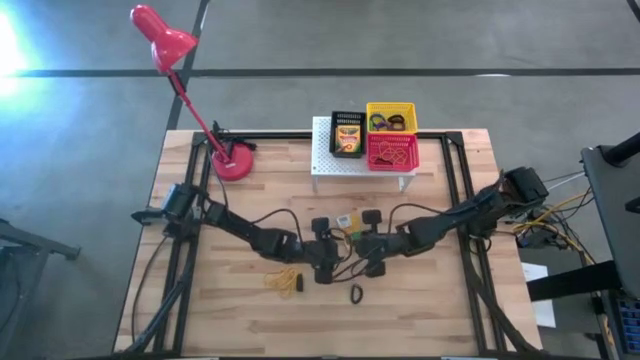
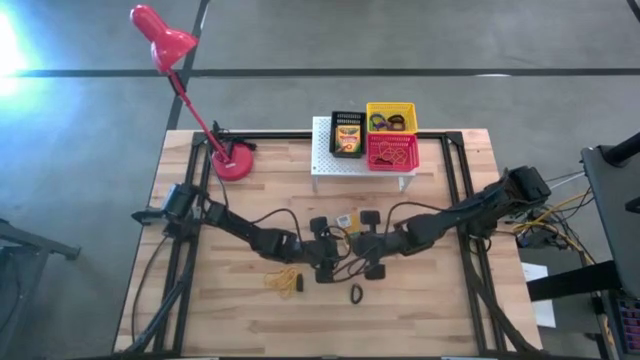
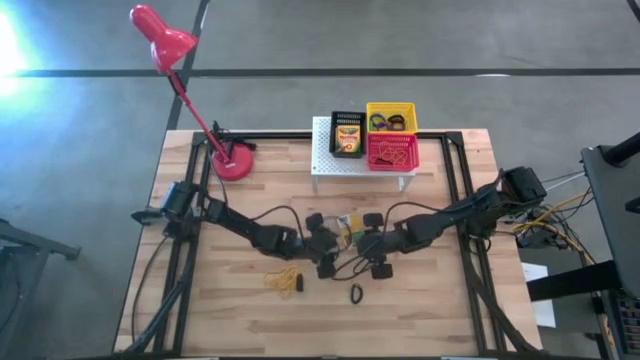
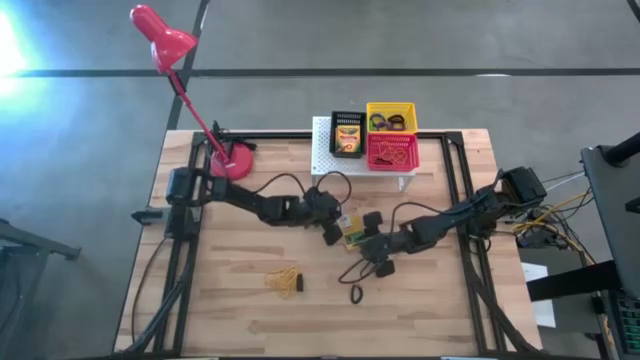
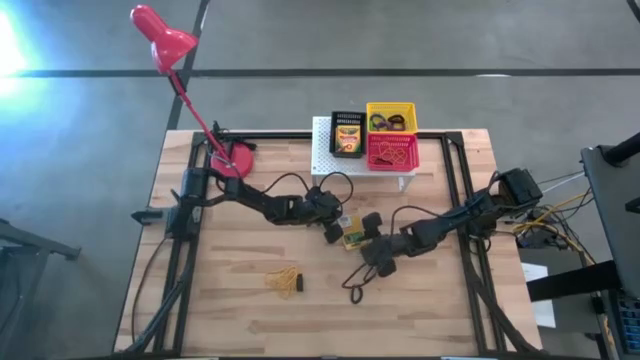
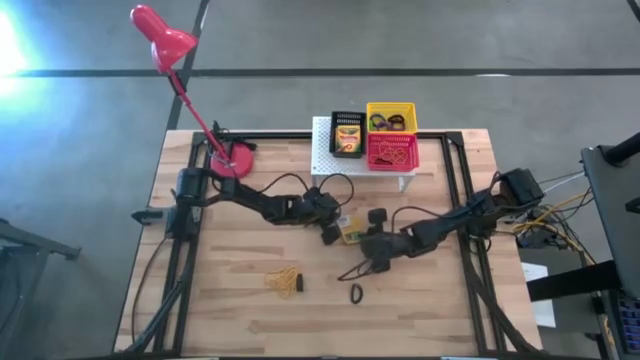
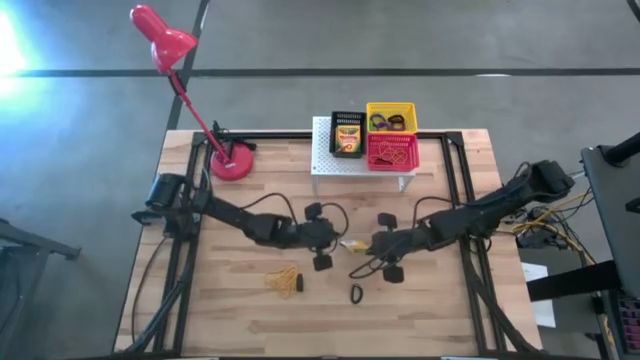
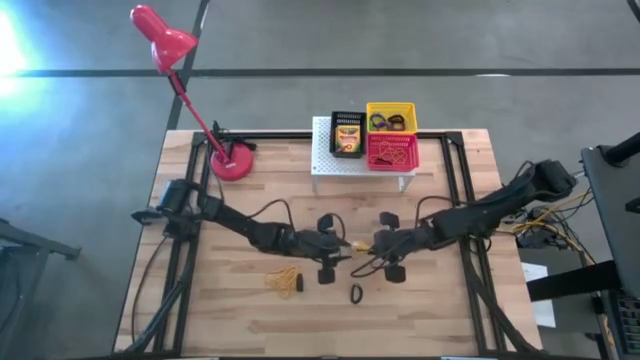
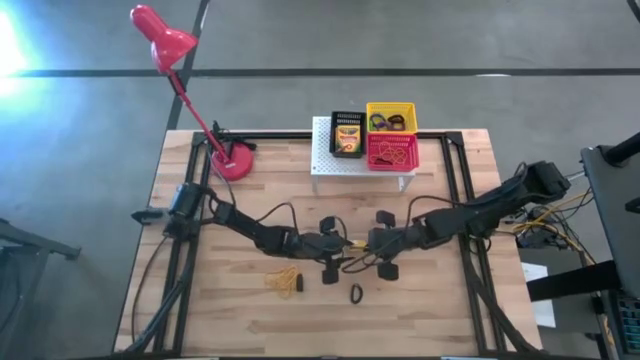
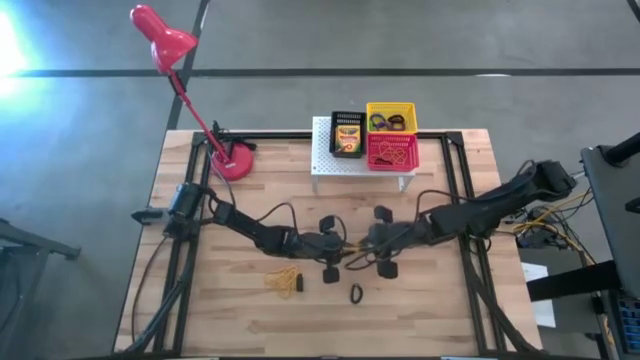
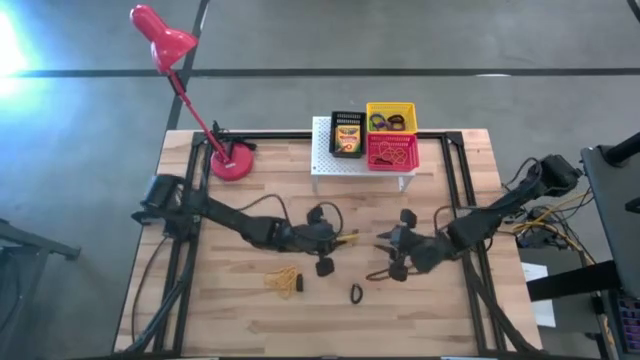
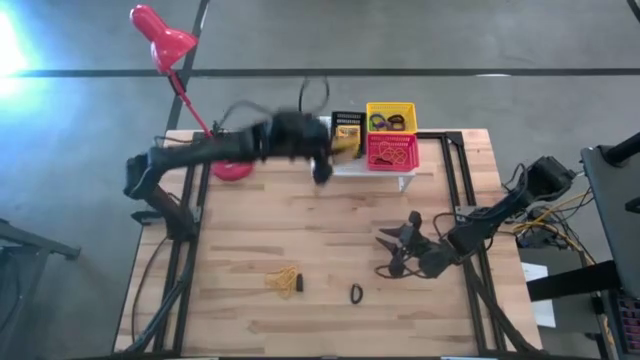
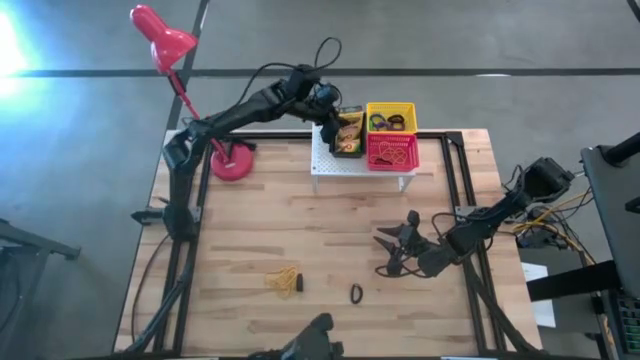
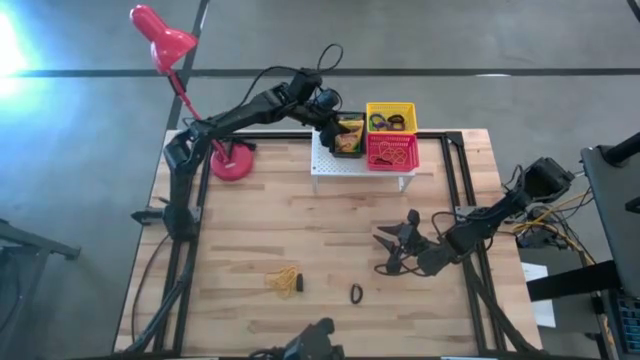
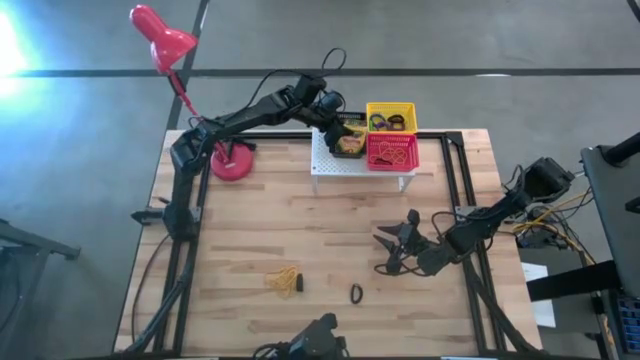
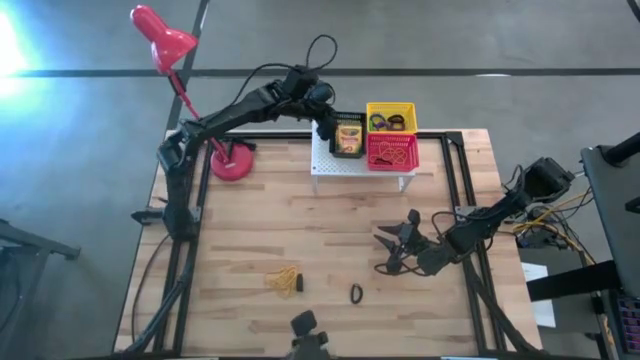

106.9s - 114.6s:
Task: Pick & Place Office Desk Supplies
Put the crayon box into the black basket on the shelf

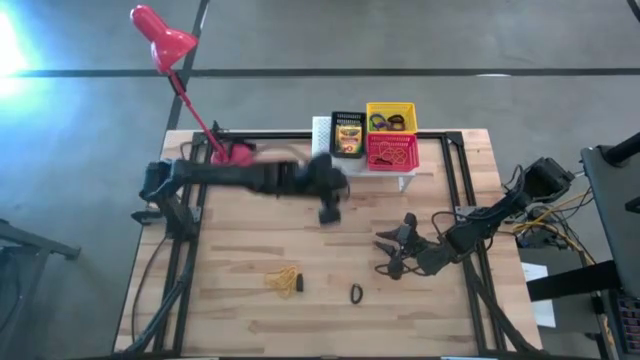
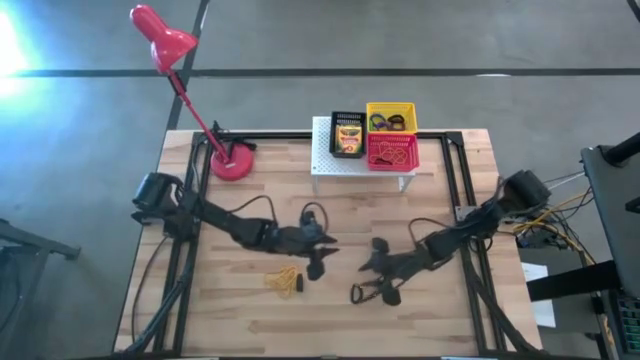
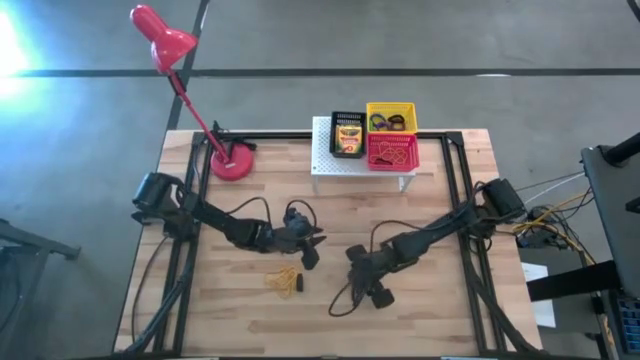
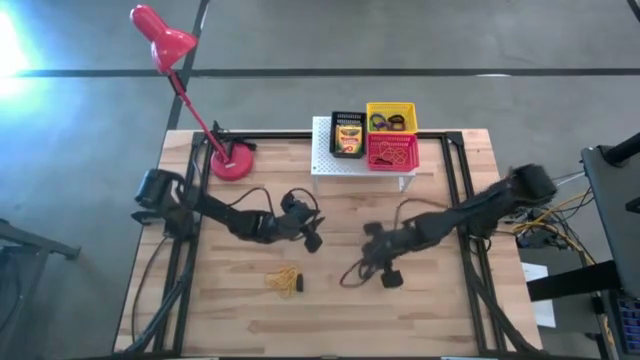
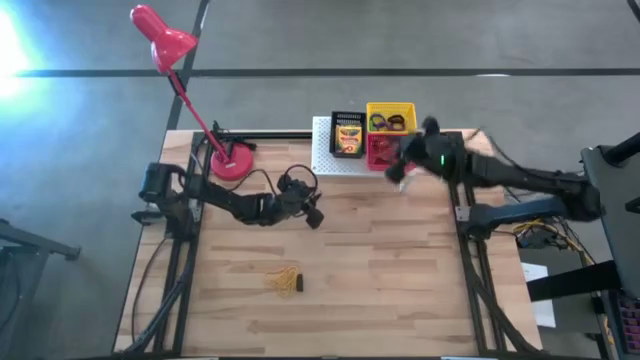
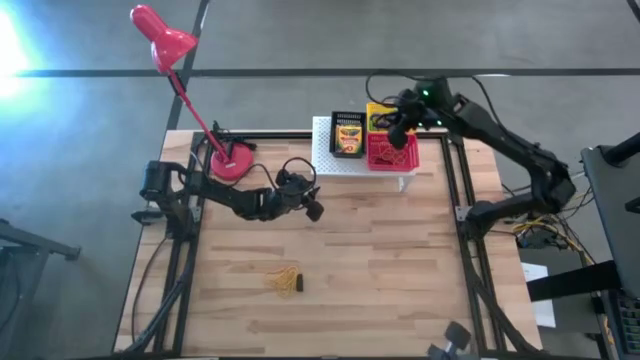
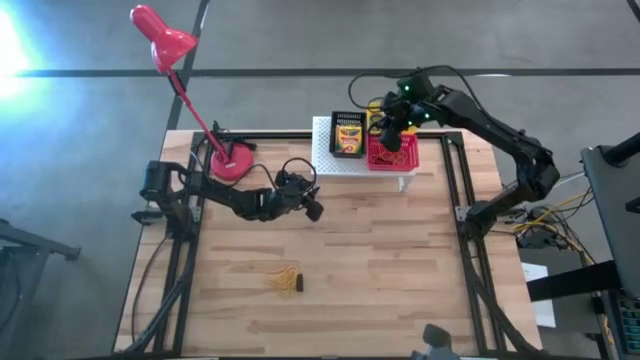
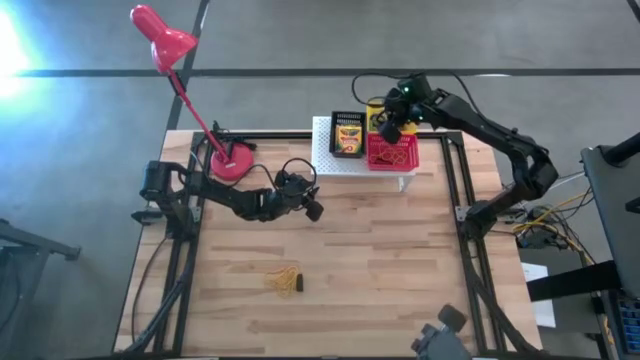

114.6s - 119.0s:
Put the black spring keychain into the yellow basket on the shelf

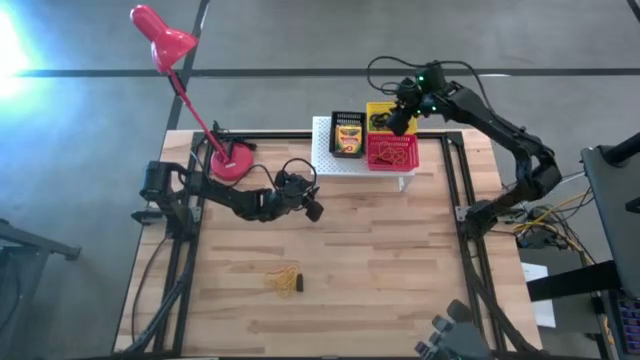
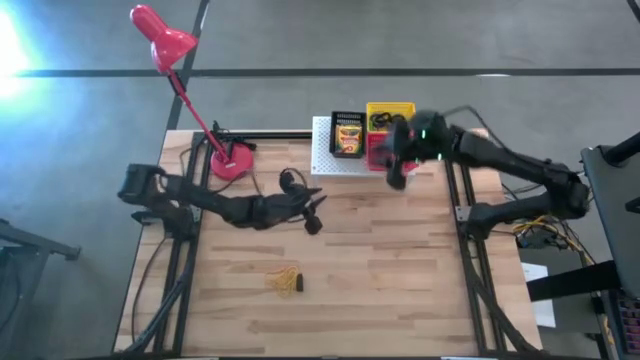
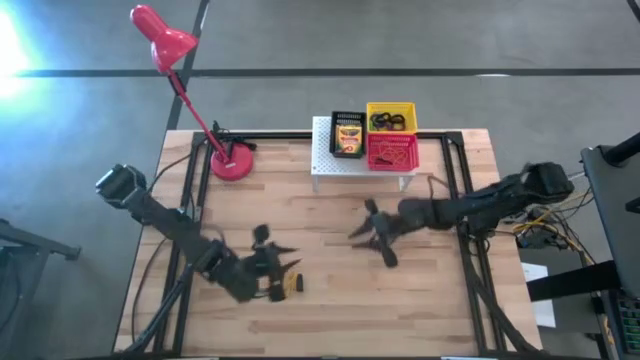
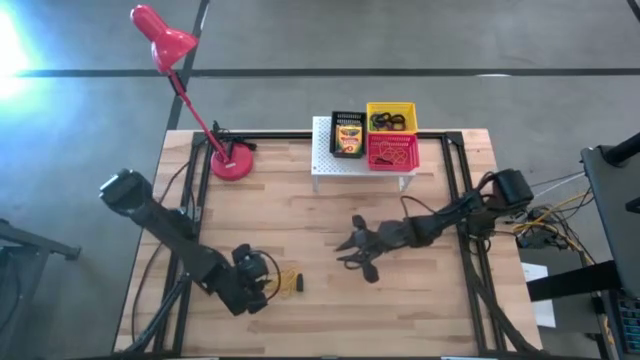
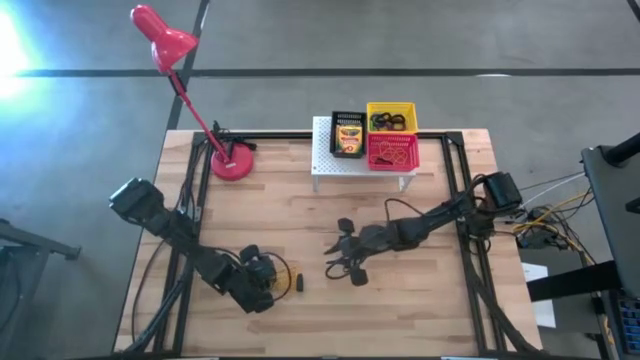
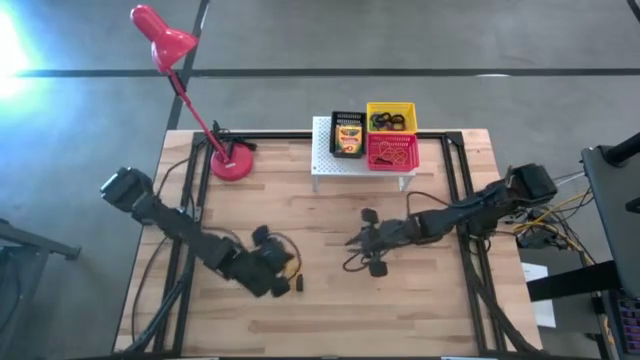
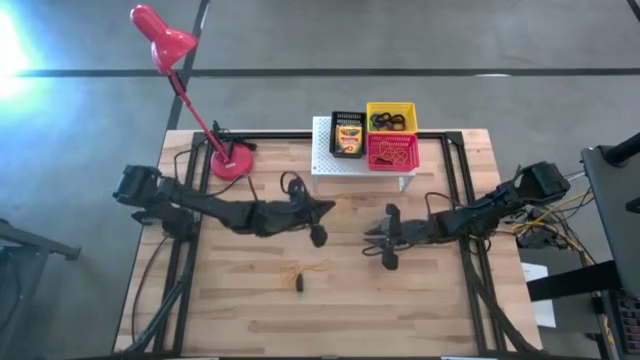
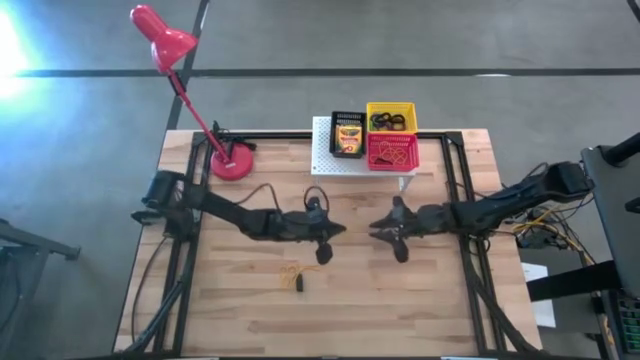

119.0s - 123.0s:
Put the yellow rubber band into the red basket on the shelf

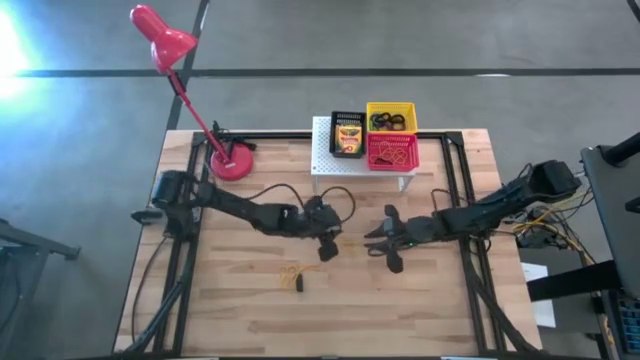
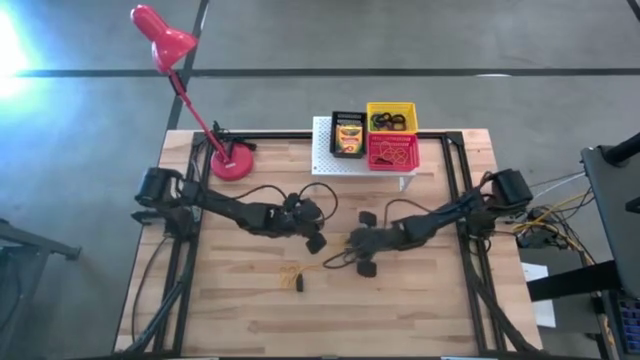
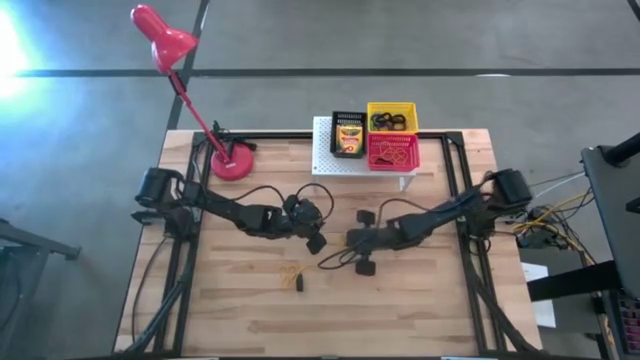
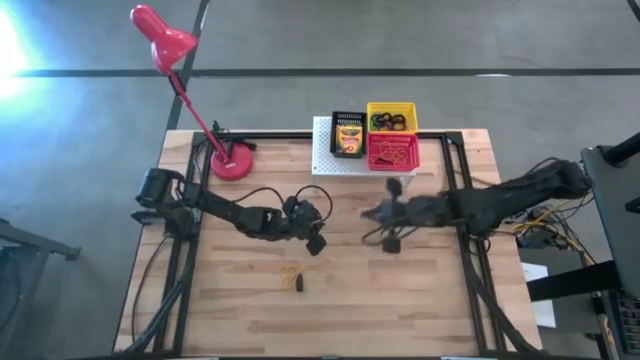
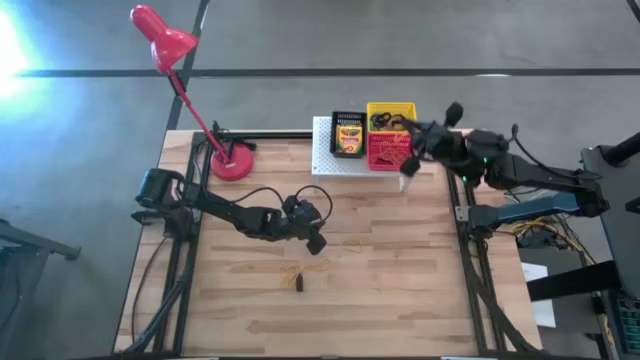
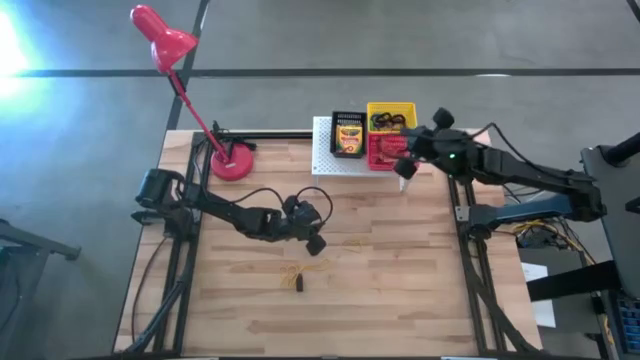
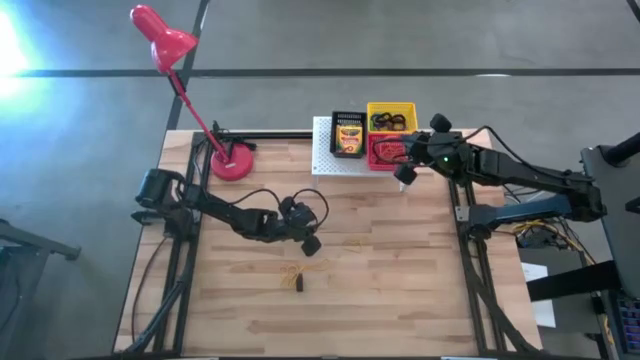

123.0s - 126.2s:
Put the yellow rubber band into the red basket on the shelf

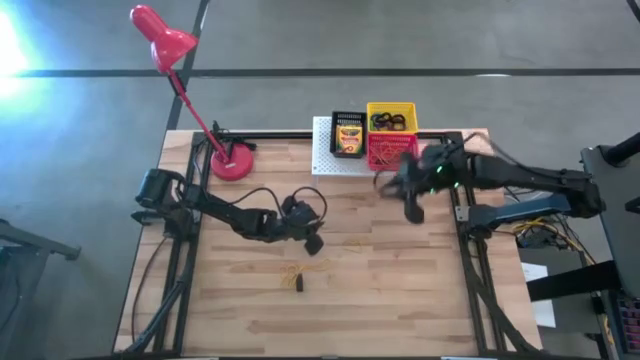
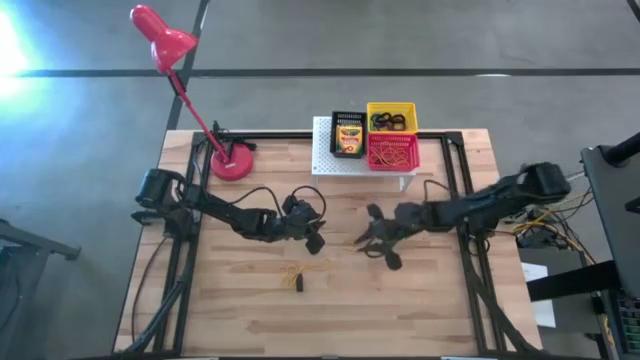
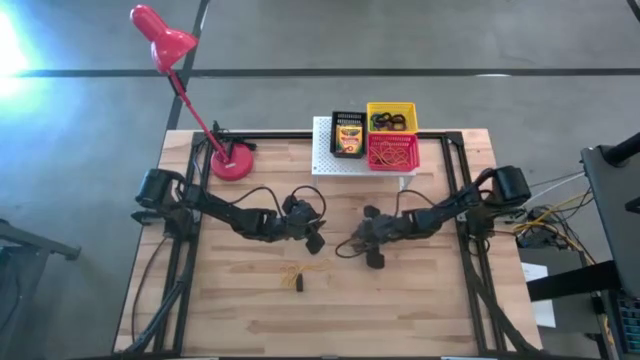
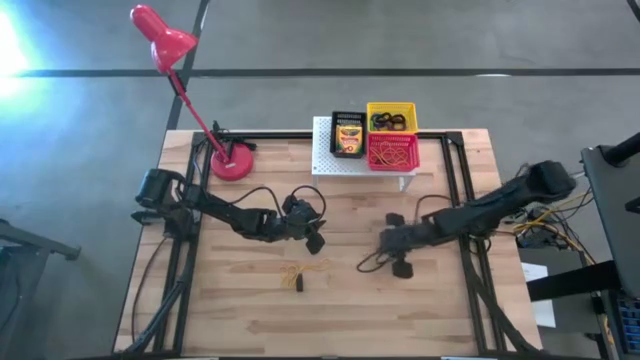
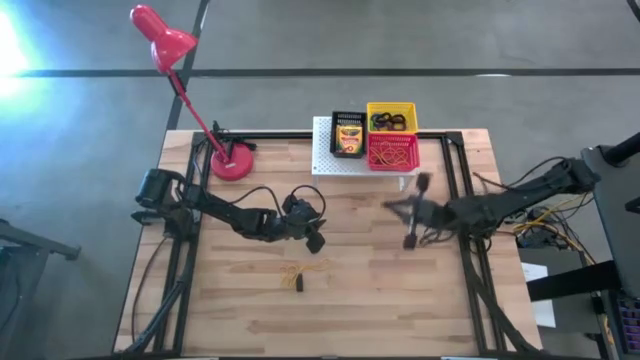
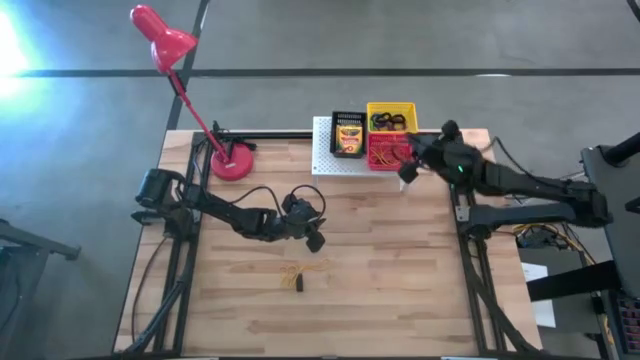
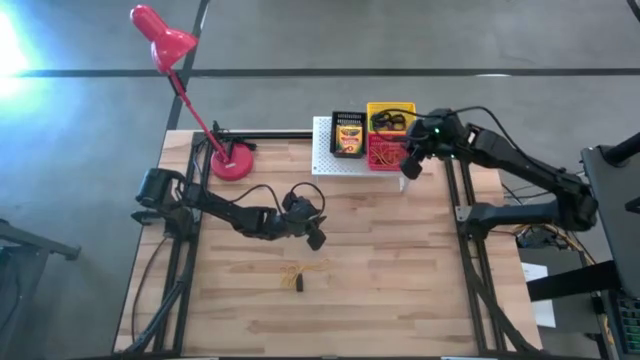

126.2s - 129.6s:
Put the yellow rubber band into the red basket on the shelf
